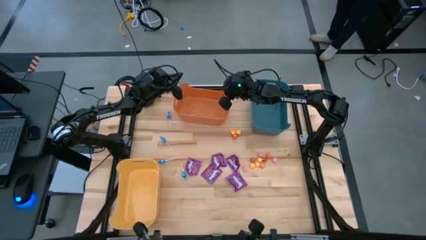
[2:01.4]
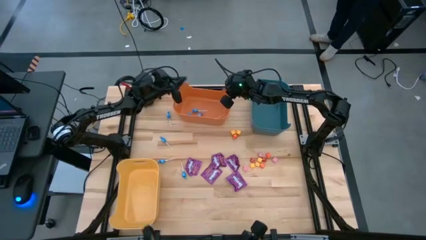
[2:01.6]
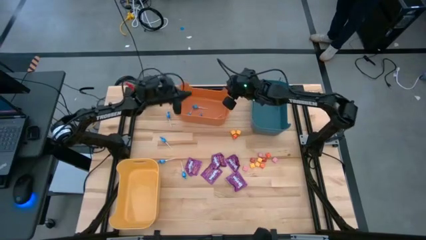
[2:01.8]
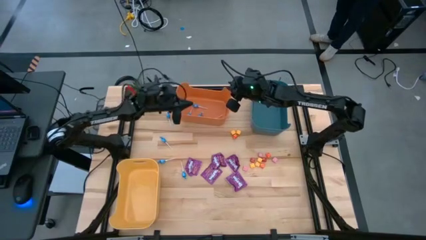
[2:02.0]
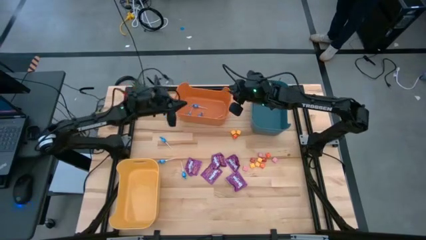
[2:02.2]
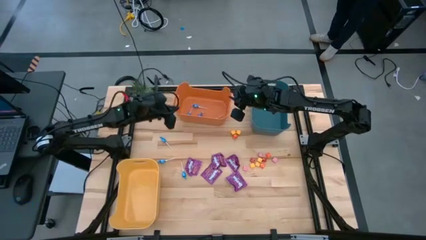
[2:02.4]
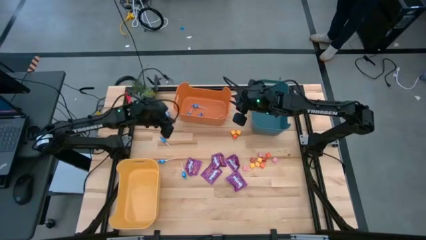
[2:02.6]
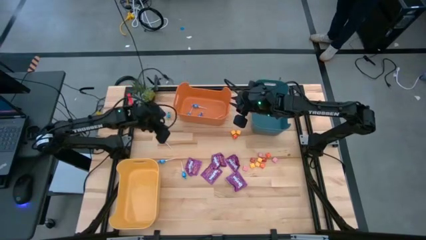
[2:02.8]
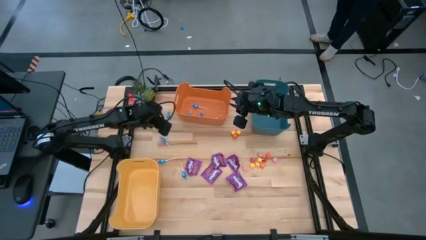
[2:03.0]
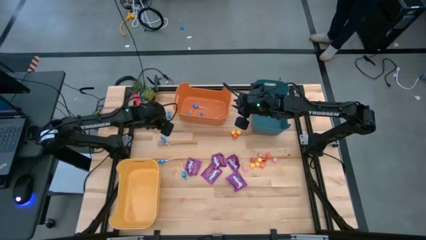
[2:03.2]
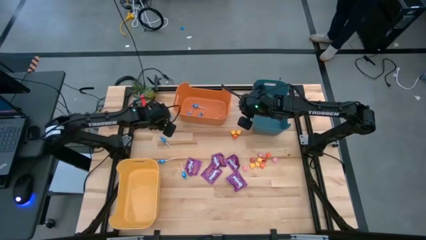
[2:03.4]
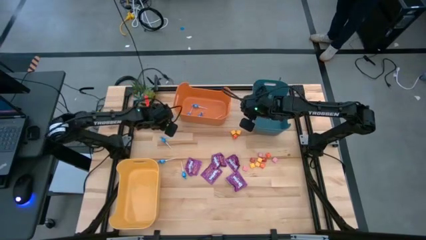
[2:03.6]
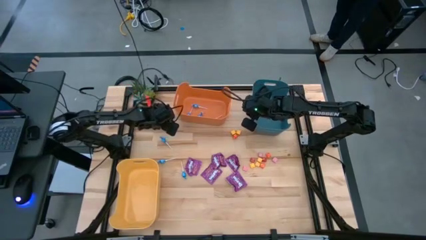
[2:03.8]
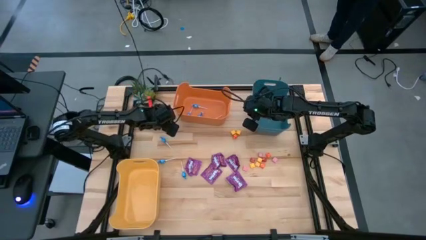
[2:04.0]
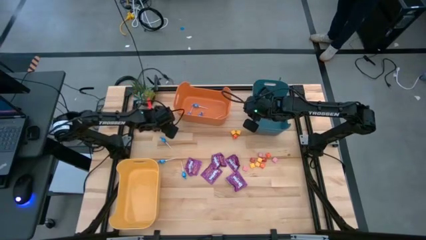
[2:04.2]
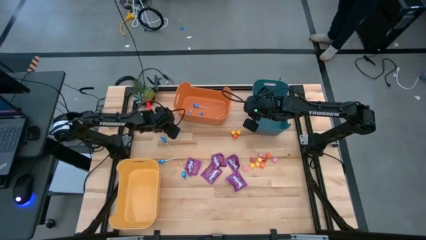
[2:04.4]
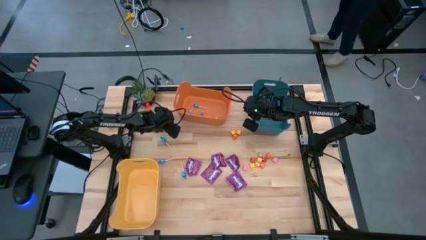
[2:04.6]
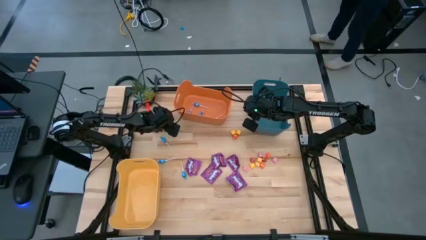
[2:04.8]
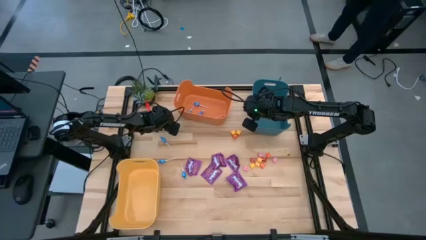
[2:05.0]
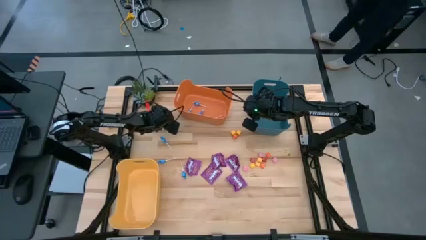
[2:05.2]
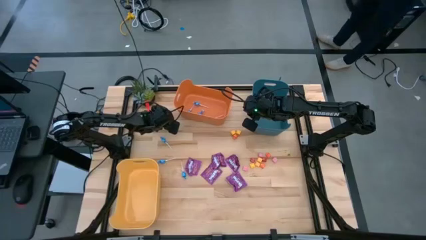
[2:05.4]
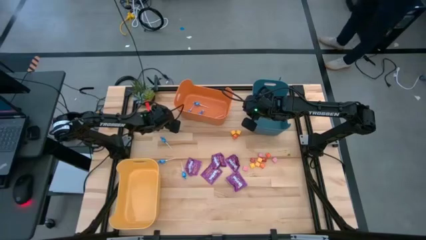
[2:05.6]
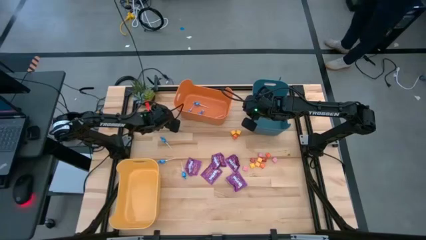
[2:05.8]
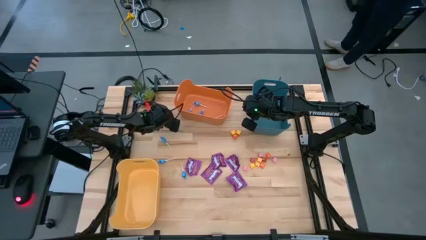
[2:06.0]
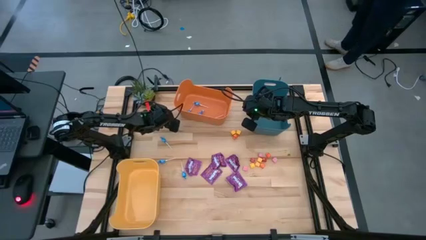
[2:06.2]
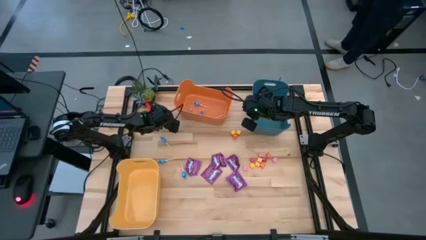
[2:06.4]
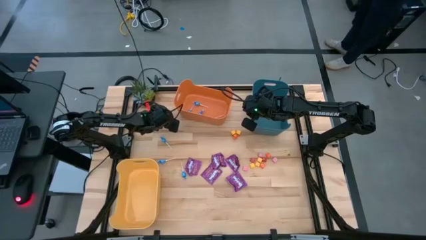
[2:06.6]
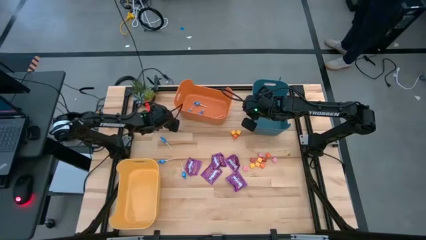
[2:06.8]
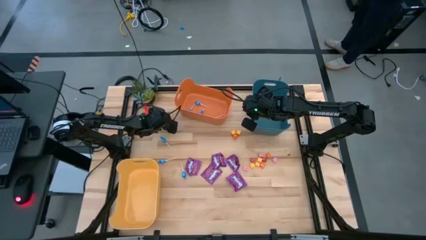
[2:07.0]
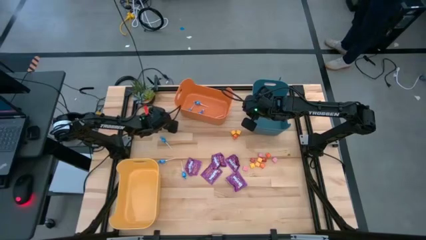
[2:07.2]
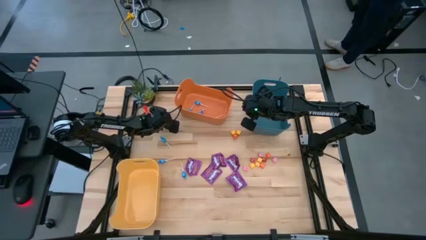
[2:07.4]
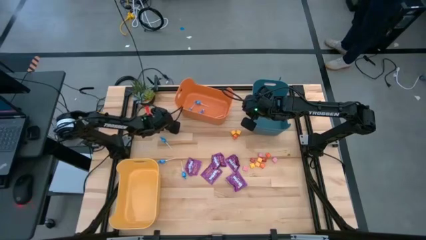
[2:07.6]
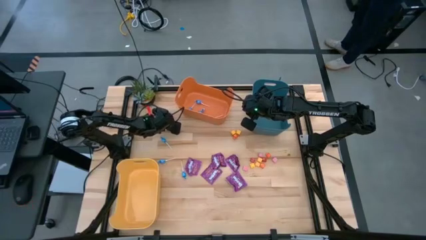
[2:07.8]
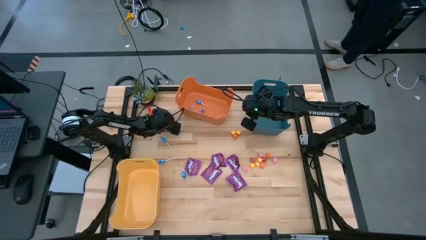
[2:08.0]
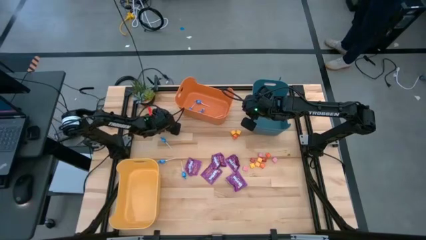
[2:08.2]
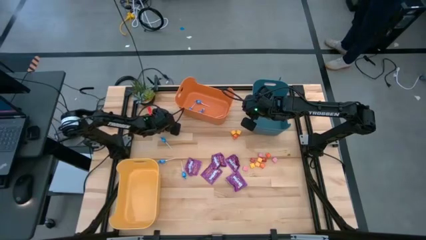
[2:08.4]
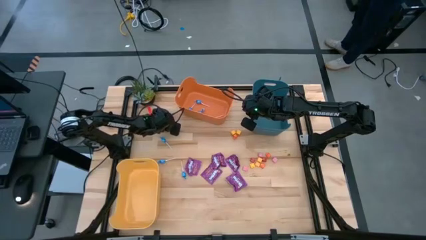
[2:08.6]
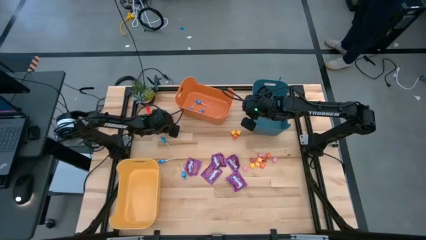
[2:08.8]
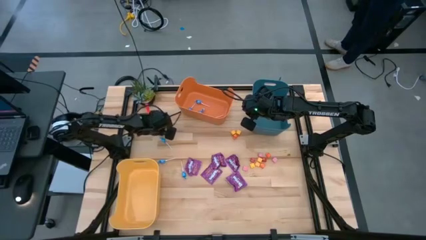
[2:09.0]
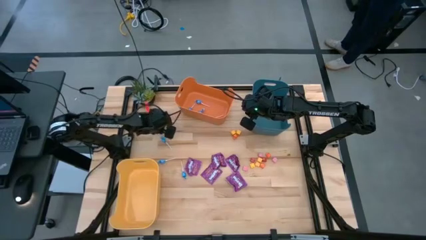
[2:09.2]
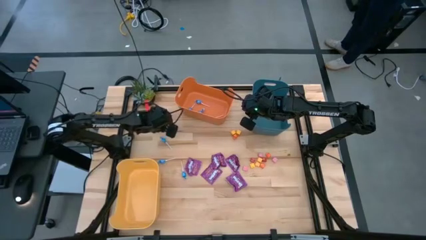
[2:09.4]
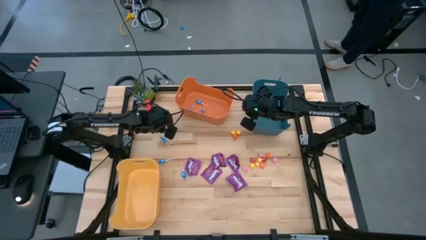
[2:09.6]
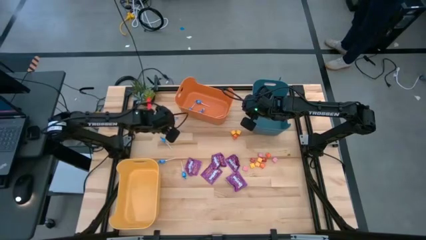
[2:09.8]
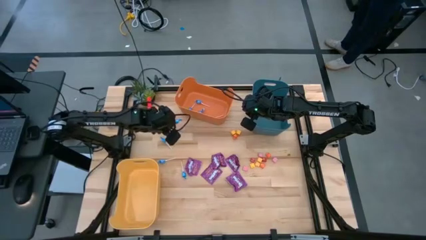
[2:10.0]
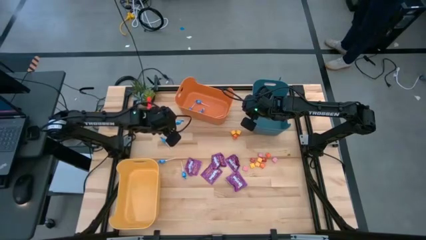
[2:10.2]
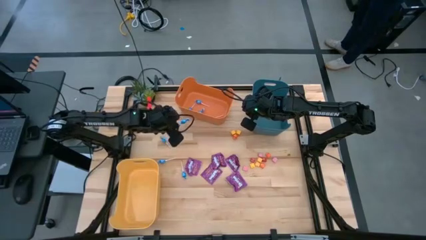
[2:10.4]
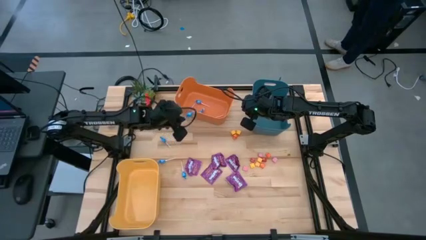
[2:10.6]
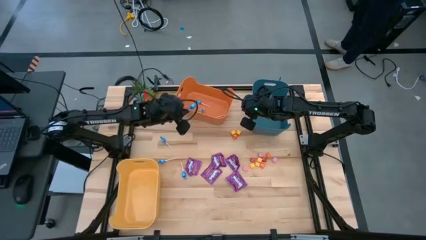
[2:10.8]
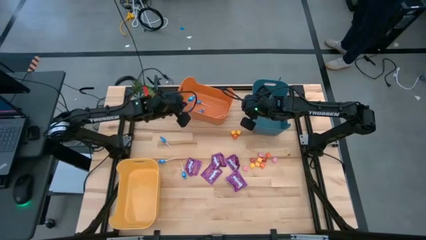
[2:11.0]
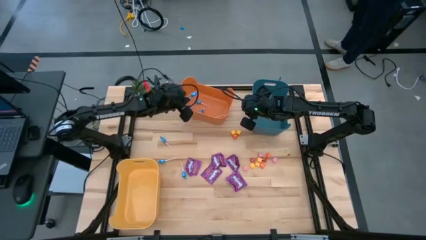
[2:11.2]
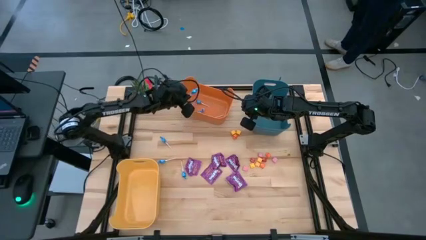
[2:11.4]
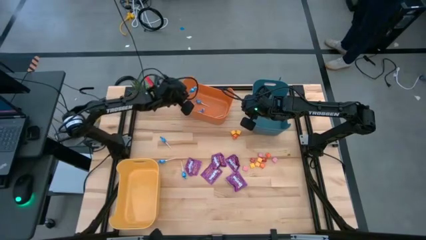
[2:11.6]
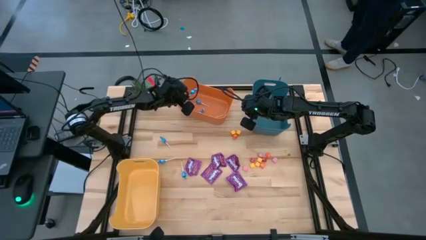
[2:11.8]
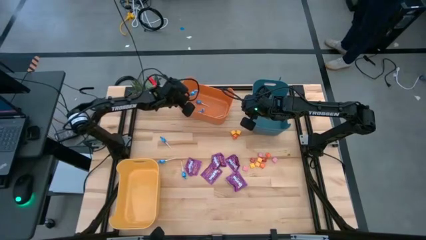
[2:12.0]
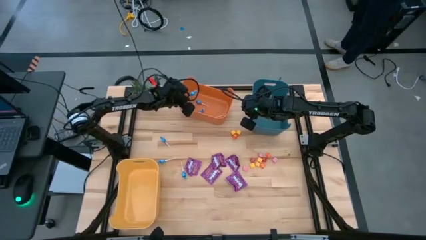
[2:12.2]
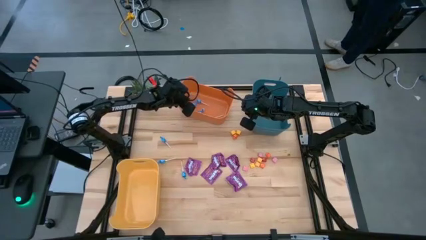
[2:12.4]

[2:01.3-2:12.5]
Task: Sort candy
Put the blue candy into the orange bin

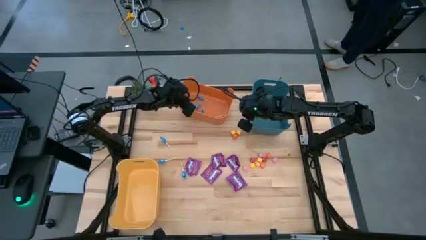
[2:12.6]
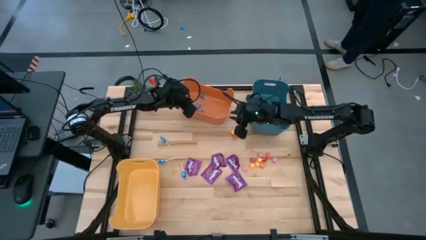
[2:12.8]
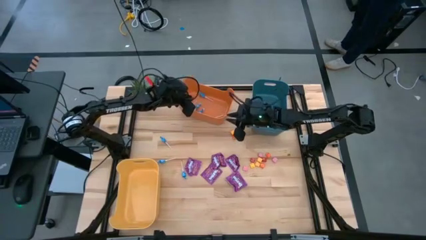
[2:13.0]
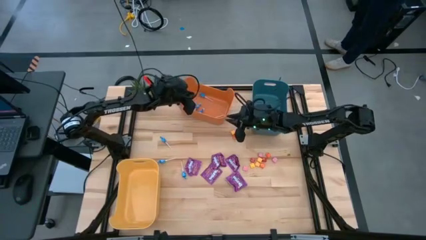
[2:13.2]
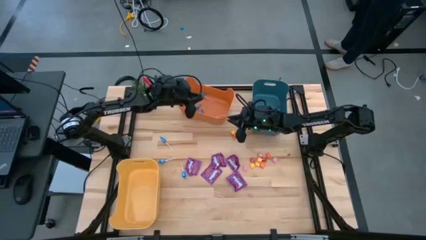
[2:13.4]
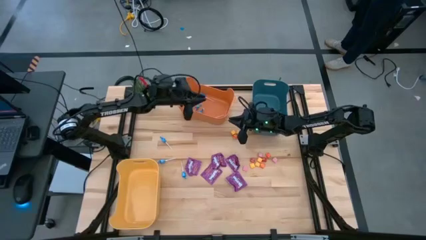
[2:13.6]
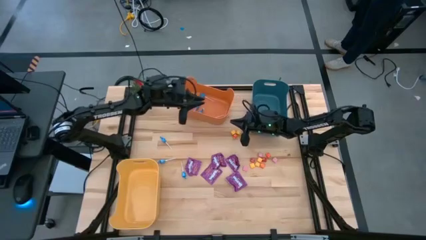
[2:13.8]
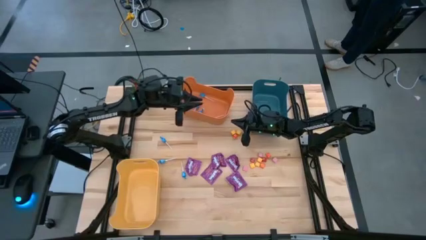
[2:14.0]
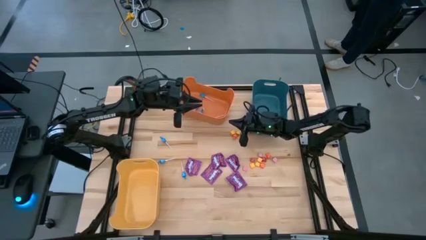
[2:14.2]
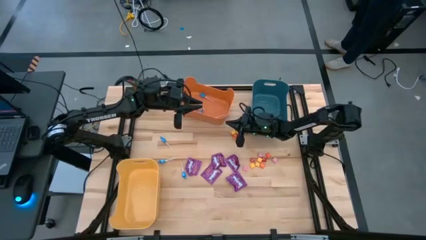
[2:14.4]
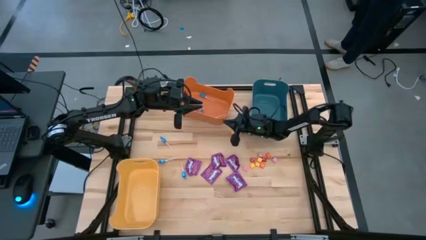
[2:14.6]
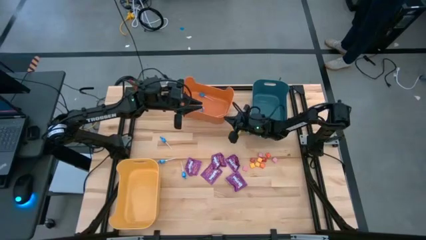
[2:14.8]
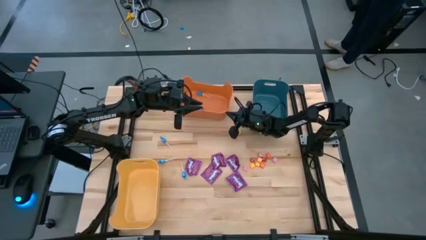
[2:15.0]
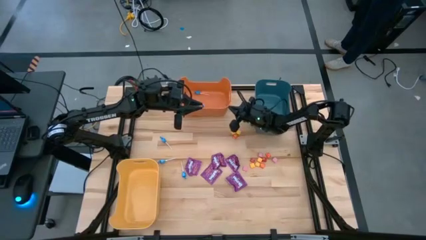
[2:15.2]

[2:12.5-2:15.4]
Adjust the orange bin
